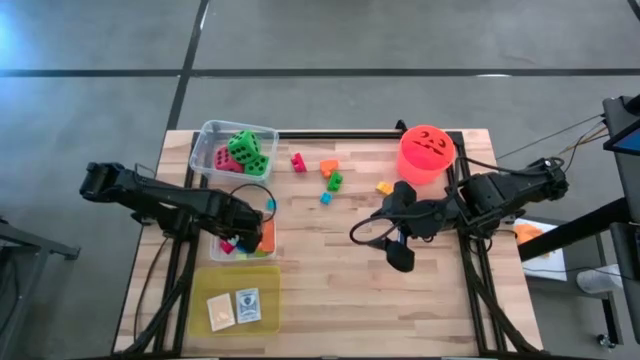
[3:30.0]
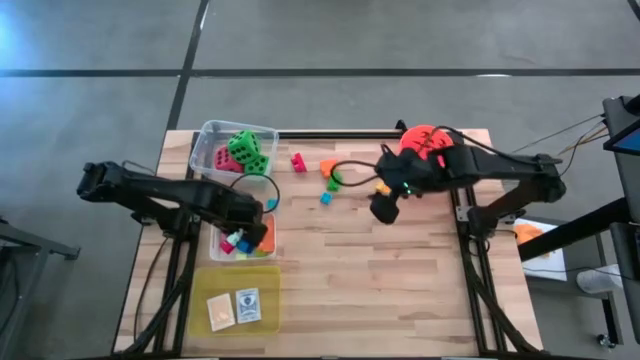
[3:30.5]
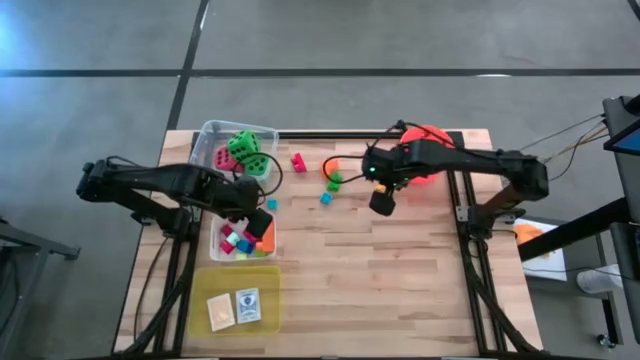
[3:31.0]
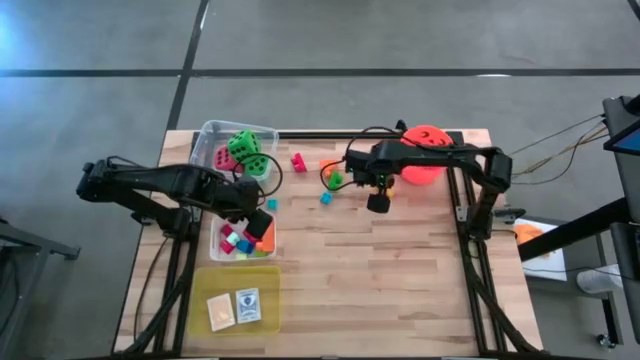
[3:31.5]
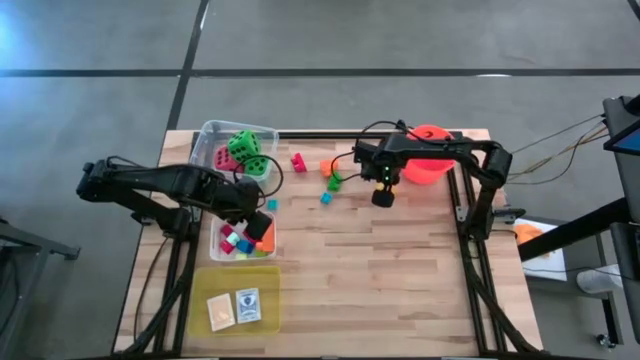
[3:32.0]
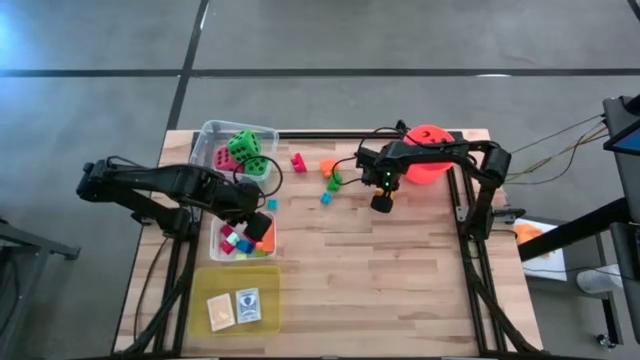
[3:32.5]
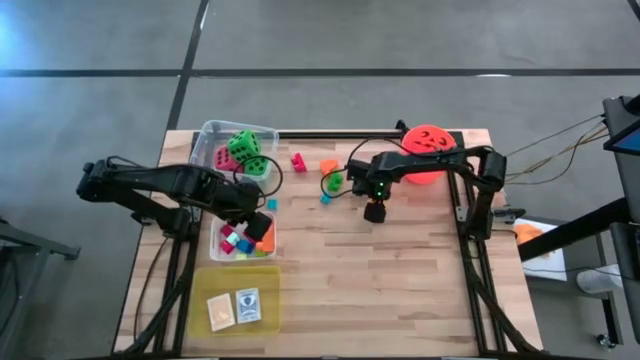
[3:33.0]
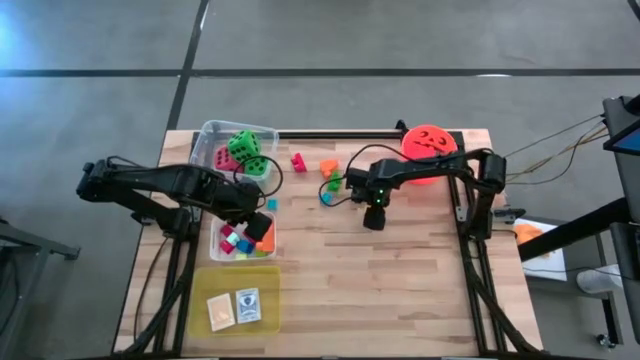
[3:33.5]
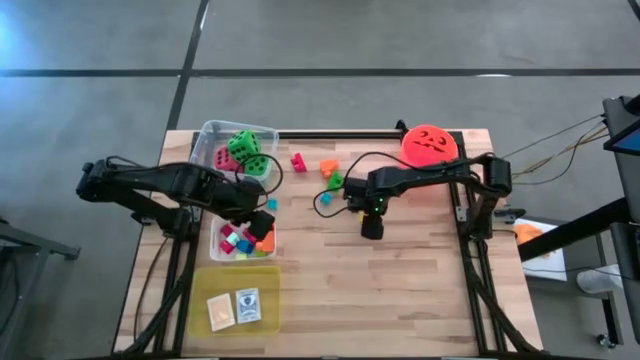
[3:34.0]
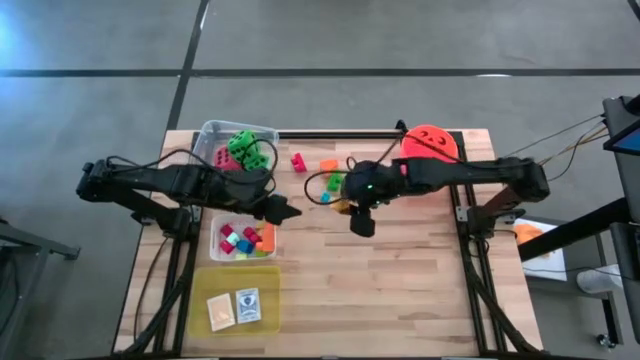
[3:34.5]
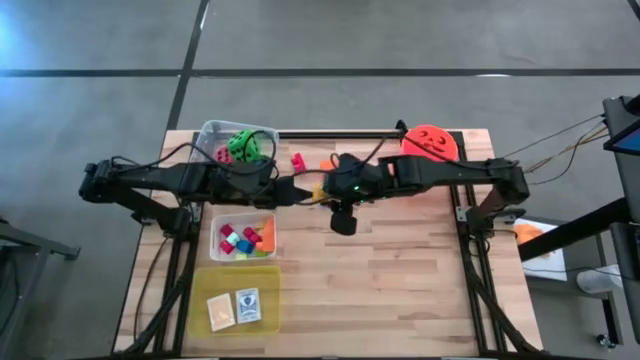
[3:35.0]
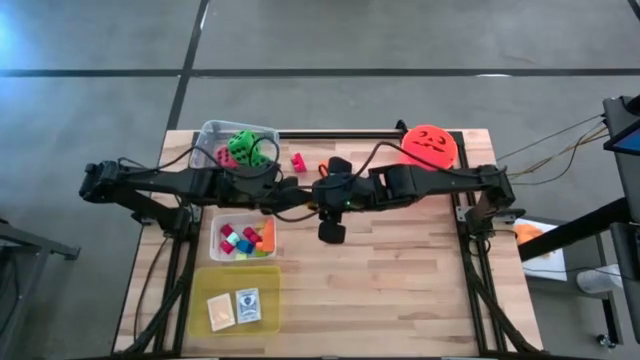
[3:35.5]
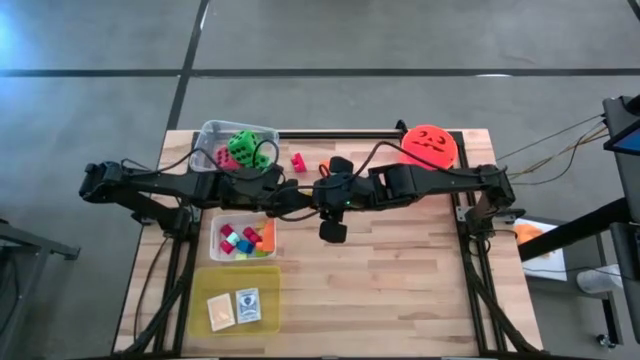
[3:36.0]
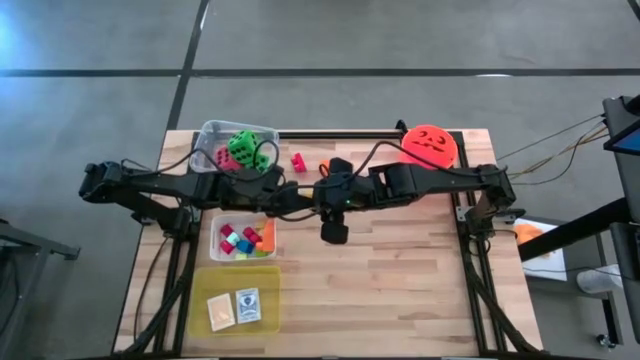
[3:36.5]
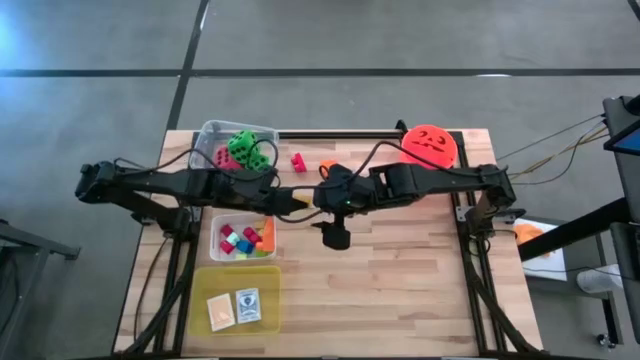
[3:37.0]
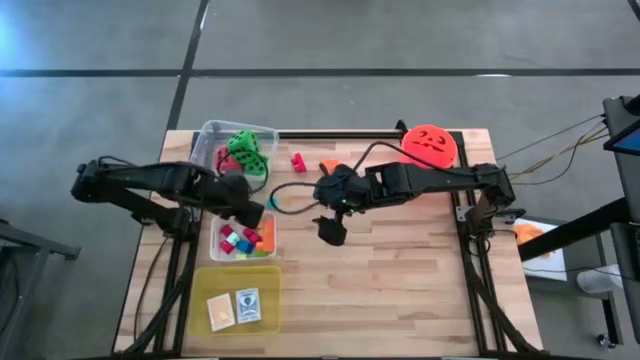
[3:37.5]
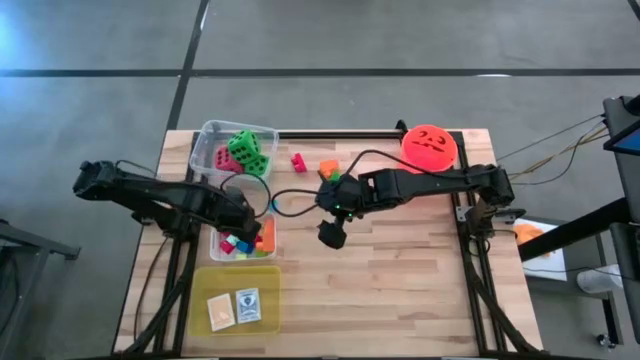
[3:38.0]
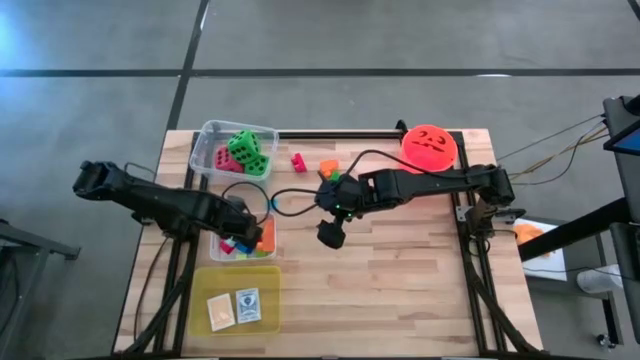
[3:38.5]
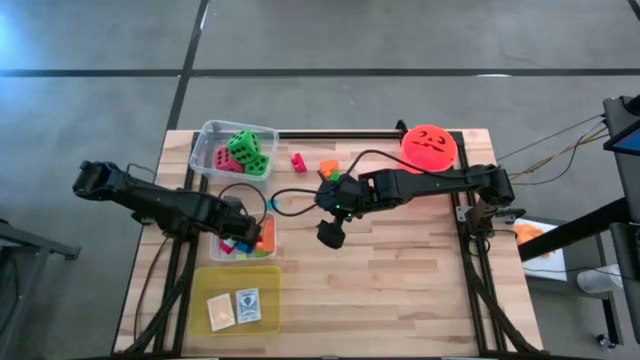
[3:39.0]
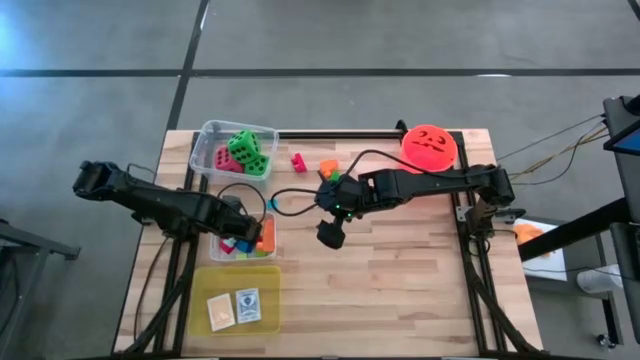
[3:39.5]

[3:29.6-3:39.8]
Task: Pick & Place Toys
Put the yellow game piece into the white bin

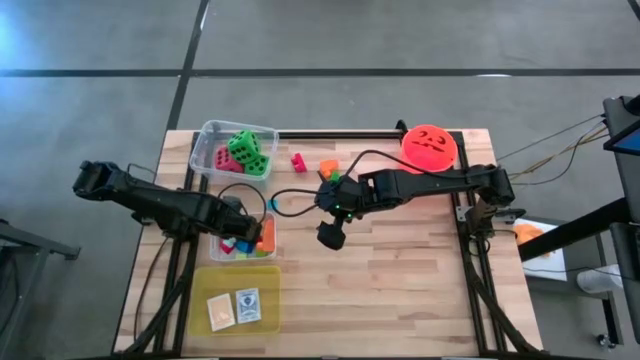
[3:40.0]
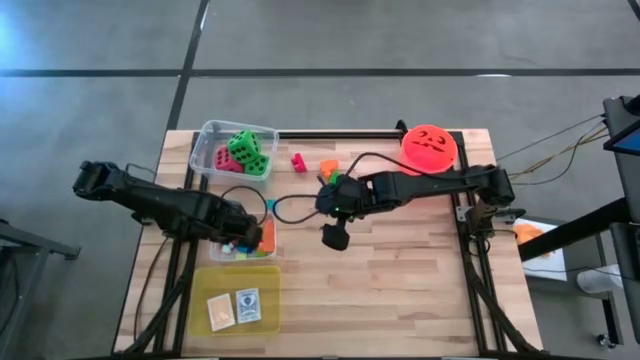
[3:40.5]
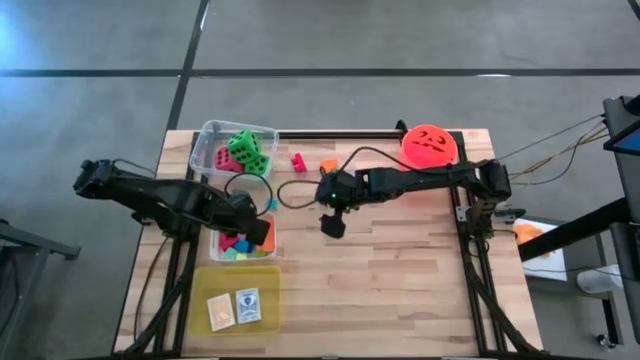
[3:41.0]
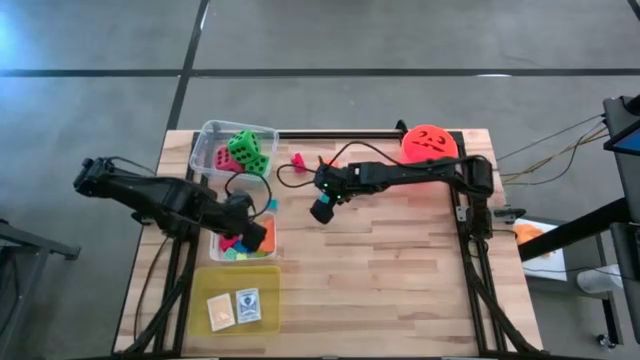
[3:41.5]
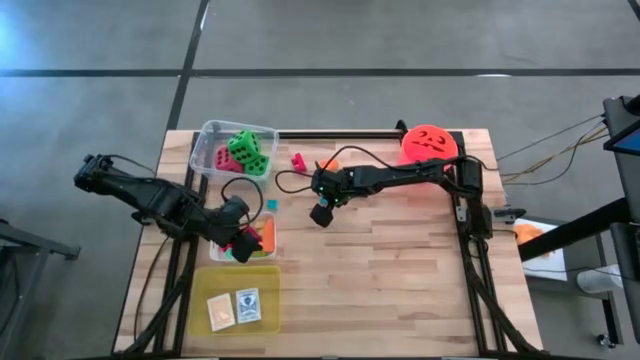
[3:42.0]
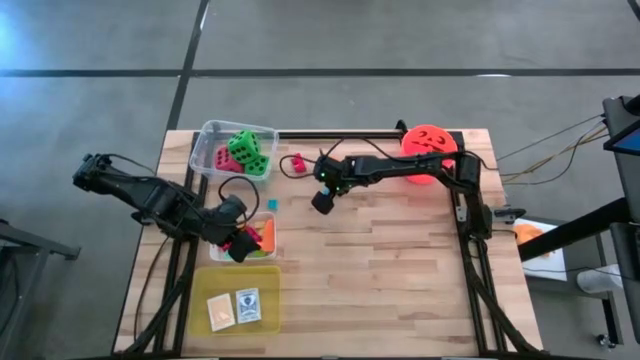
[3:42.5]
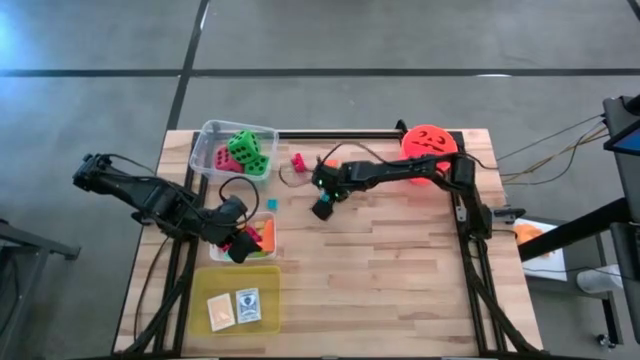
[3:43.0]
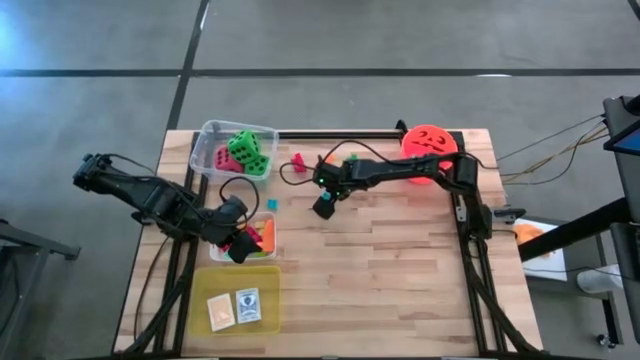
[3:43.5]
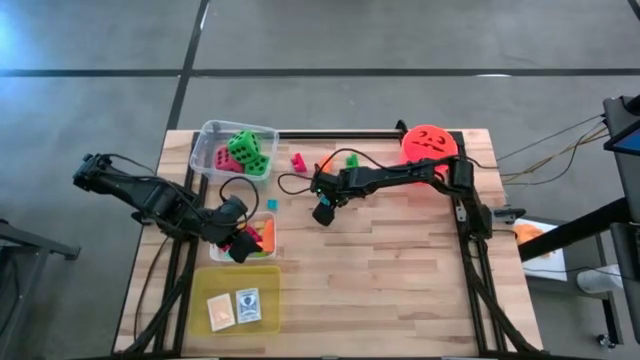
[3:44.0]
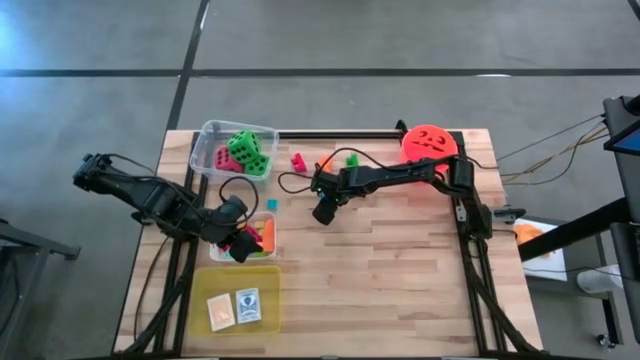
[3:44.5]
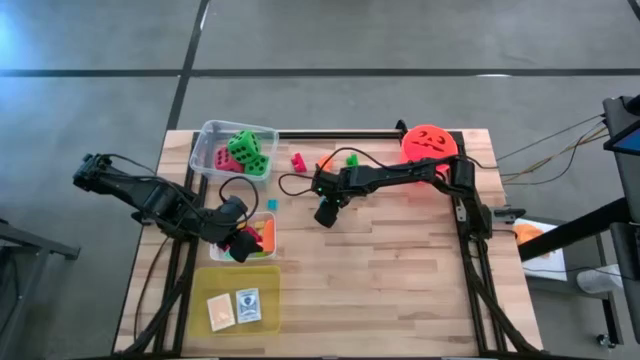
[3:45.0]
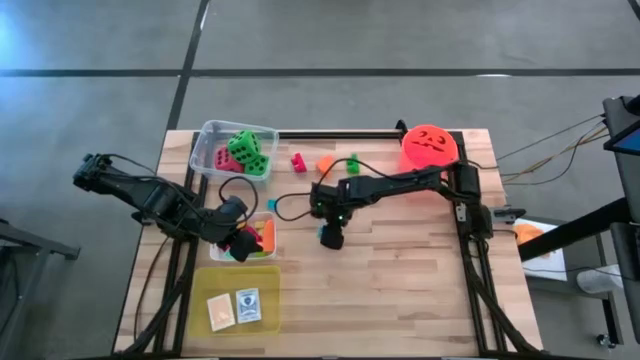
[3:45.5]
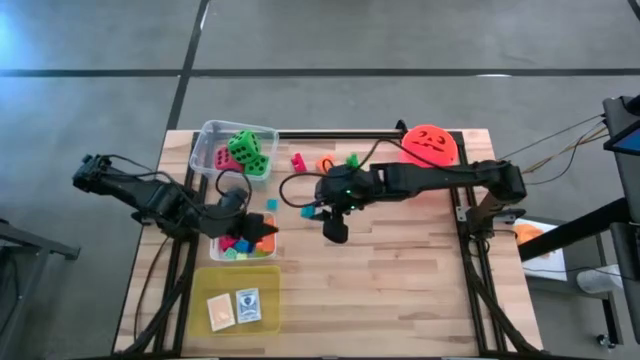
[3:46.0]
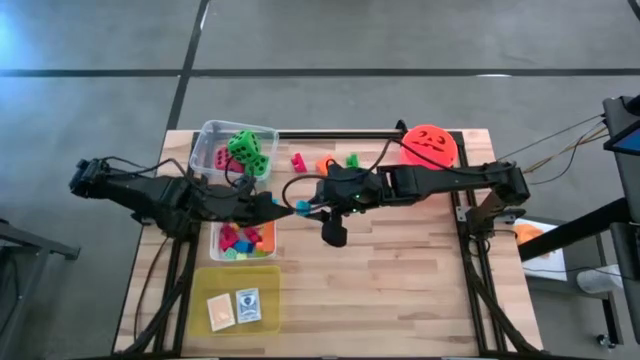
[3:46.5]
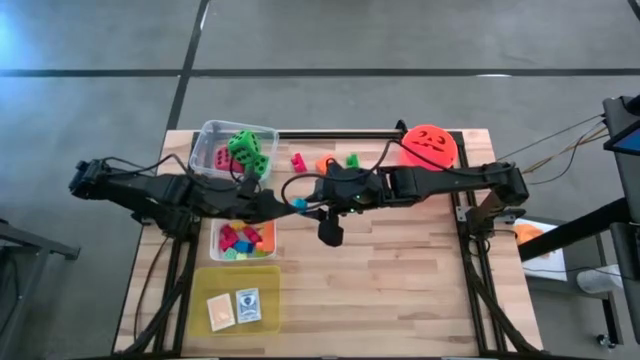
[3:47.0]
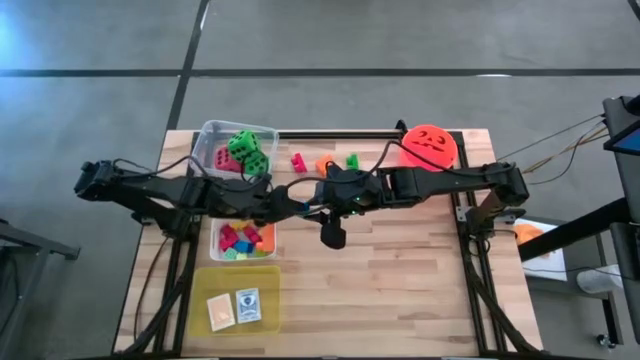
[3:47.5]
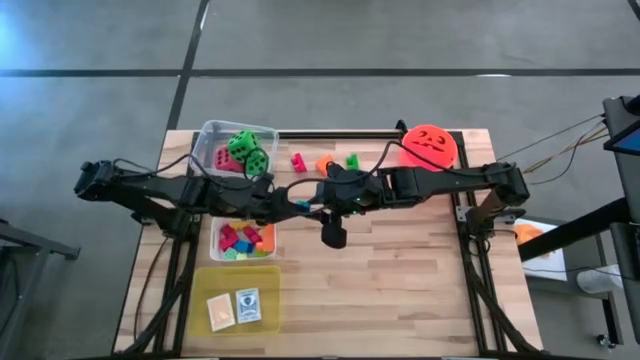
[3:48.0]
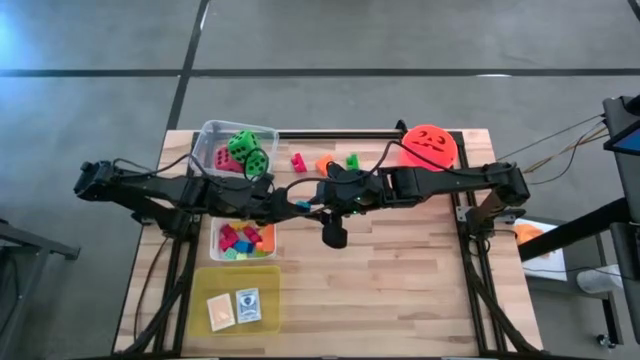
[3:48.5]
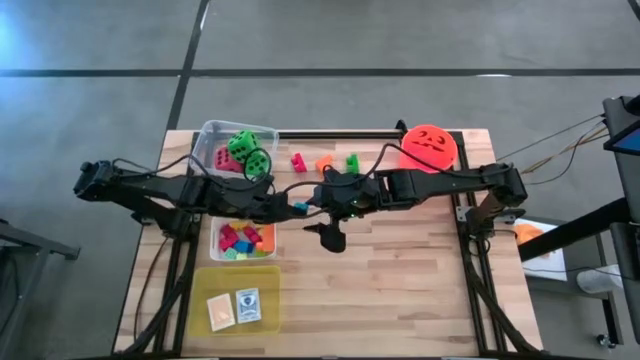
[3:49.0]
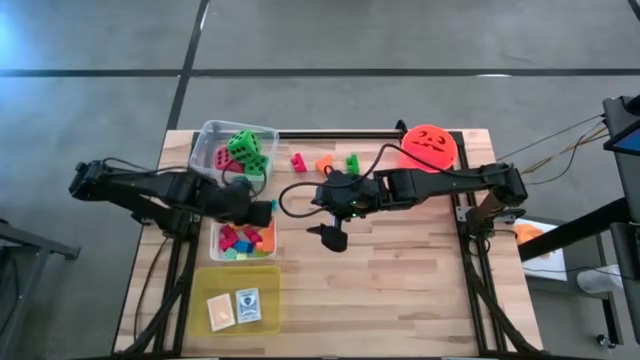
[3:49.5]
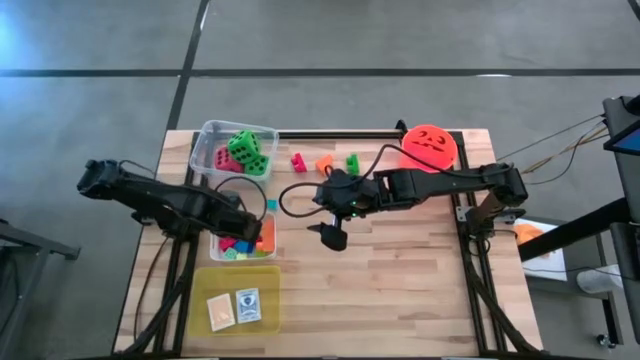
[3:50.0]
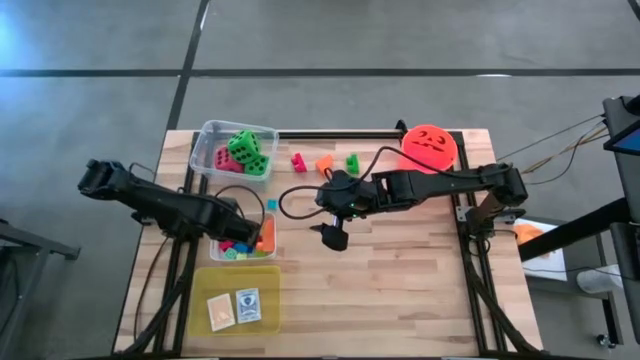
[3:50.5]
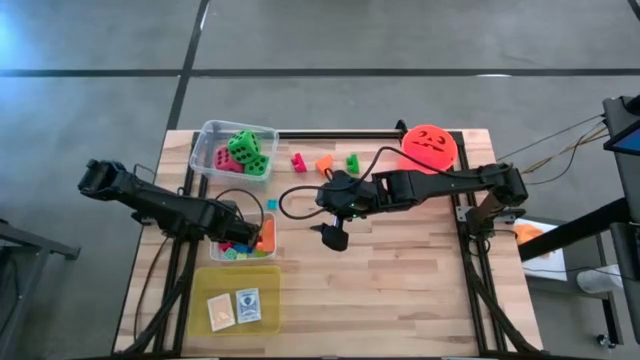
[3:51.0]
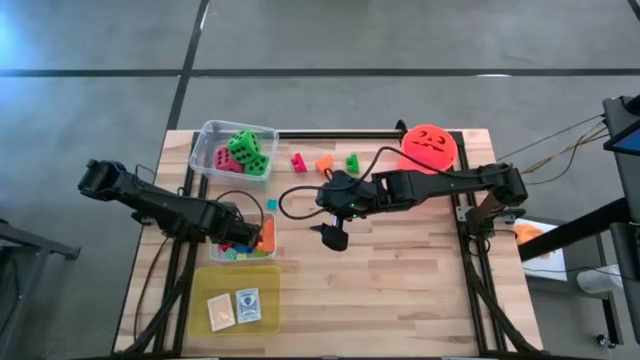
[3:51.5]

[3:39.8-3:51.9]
Put the blue game piece into the white bin
